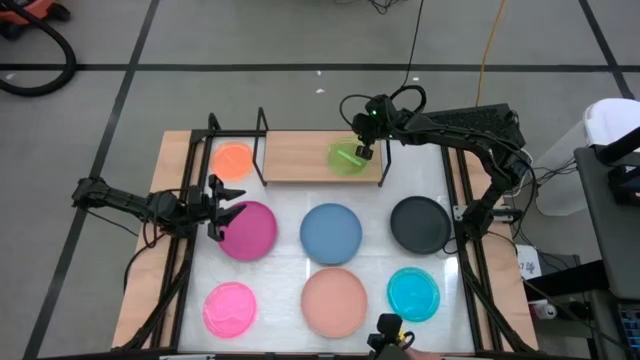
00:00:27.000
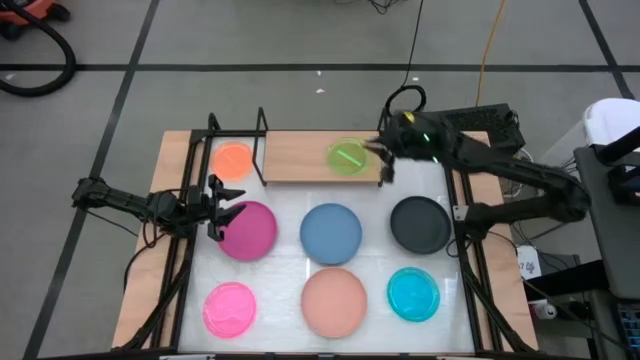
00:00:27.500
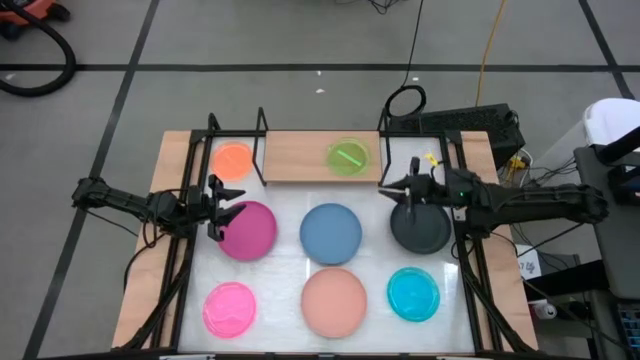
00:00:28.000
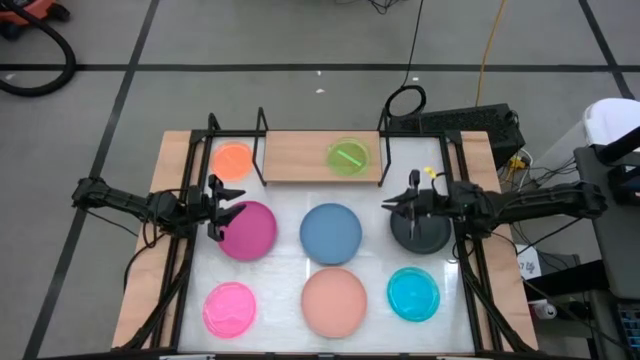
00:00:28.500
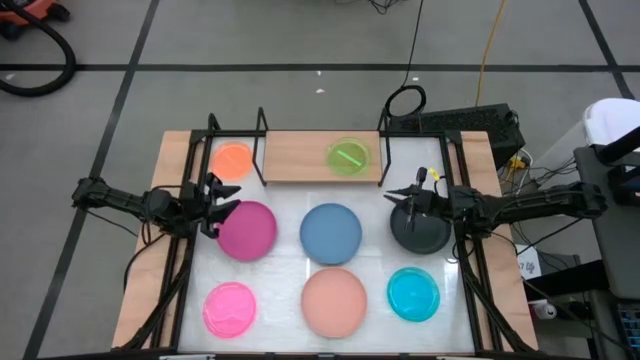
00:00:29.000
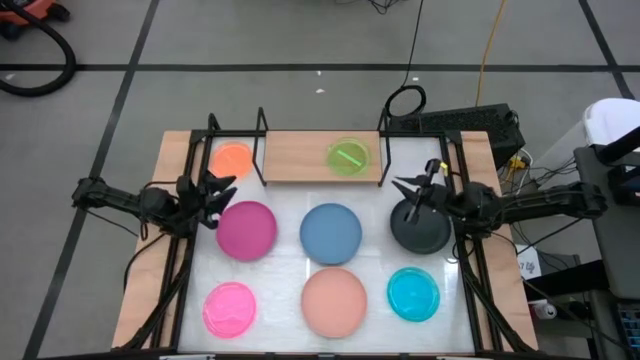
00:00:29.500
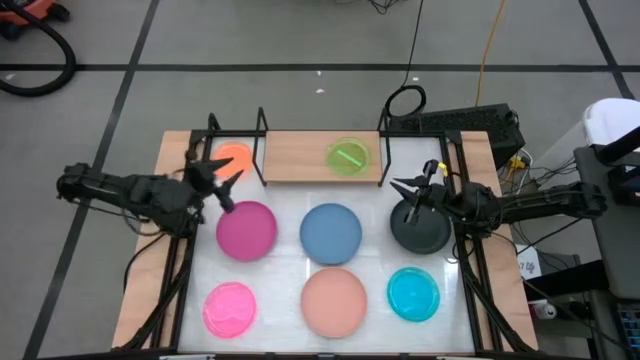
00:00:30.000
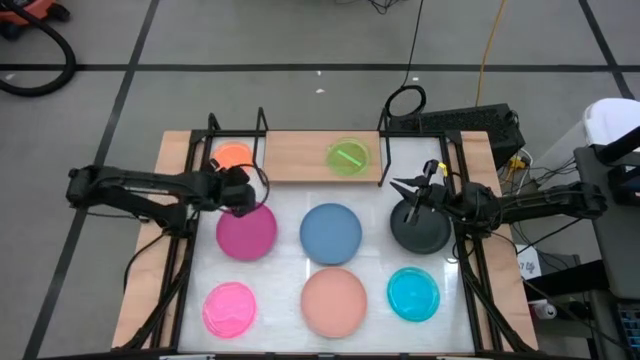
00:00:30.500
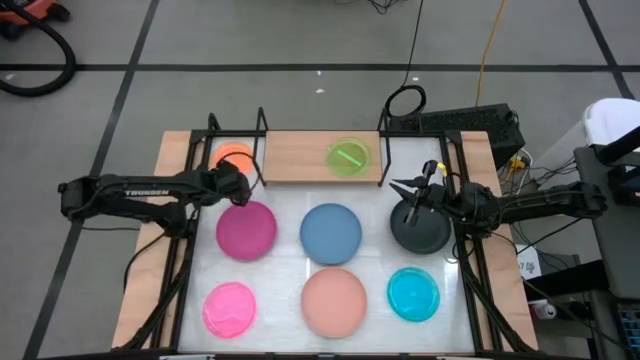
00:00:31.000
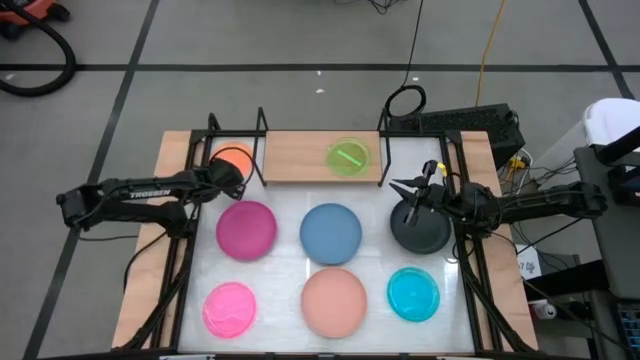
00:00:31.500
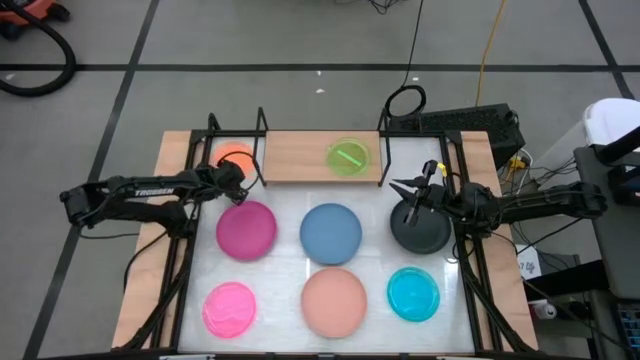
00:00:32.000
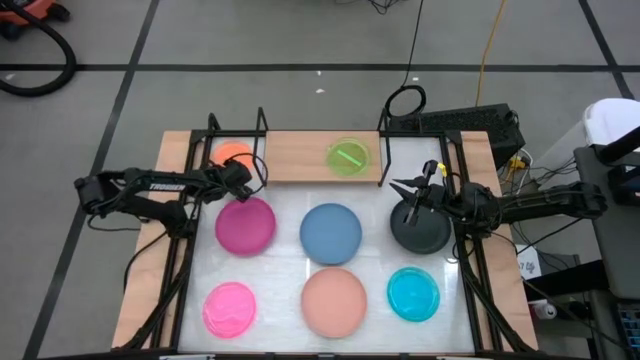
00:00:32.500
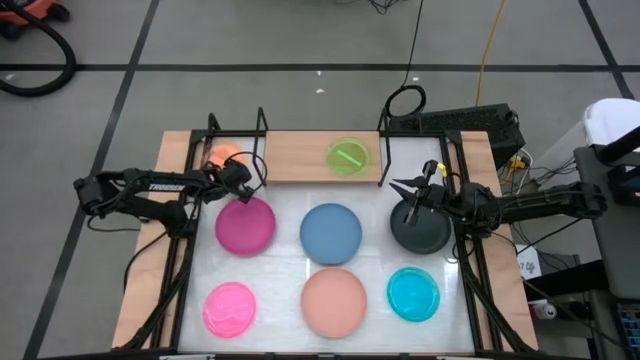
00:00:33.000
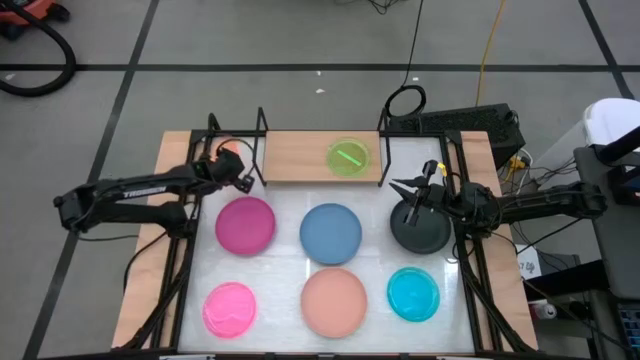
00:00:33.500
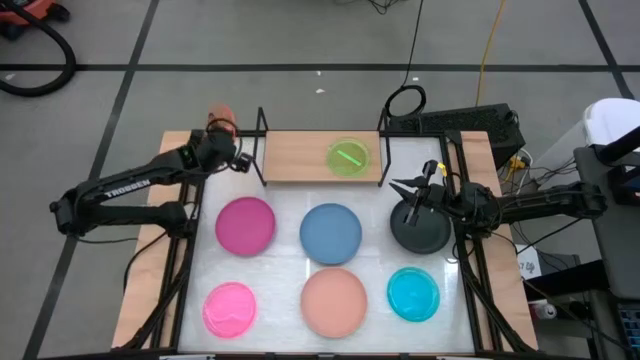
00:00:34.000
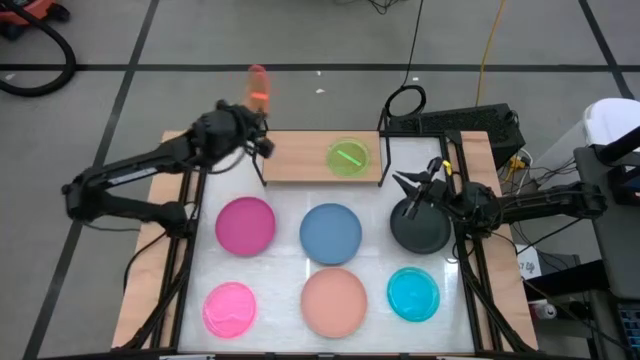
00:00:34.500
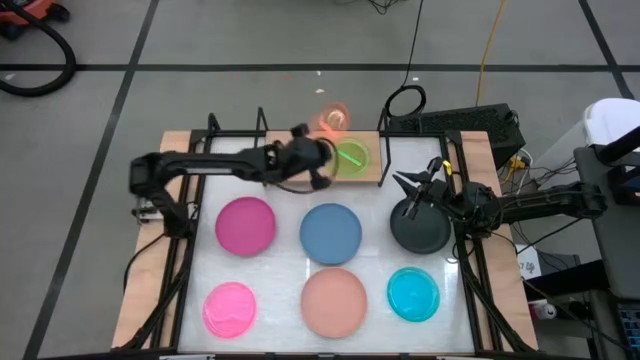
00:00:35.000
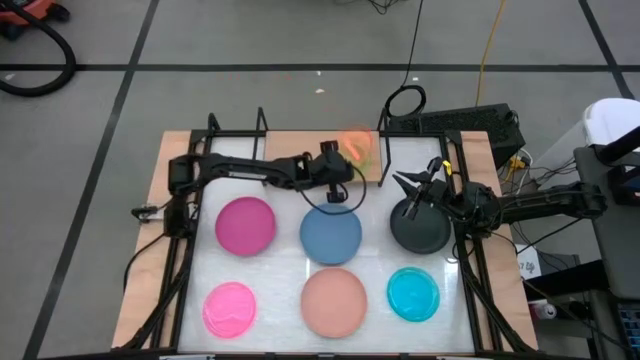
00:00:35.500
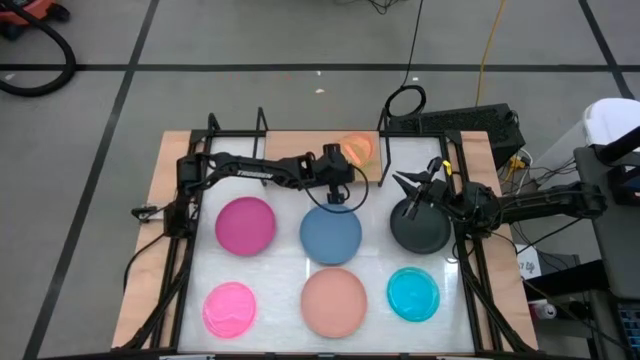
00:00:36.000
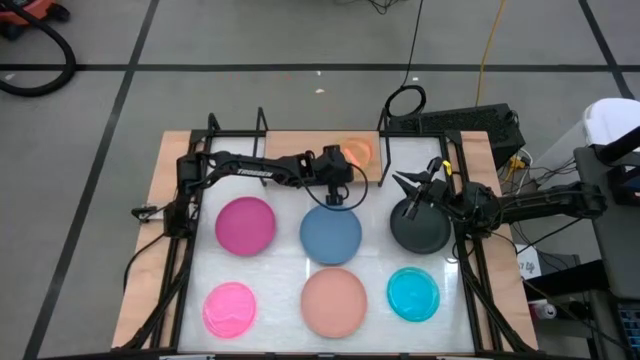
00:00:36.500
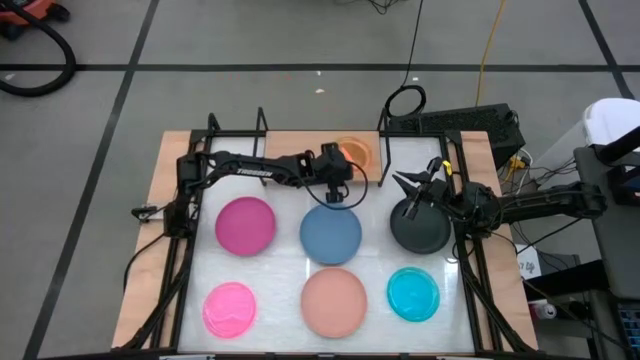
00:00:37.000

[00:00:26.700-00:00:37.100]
Task: Place and stack plates onto a shelf
Stack the orange plate on the green plate

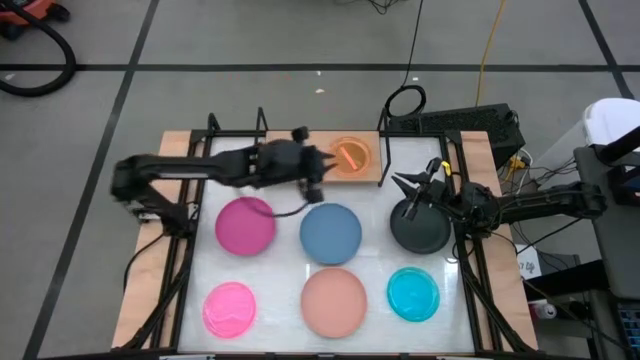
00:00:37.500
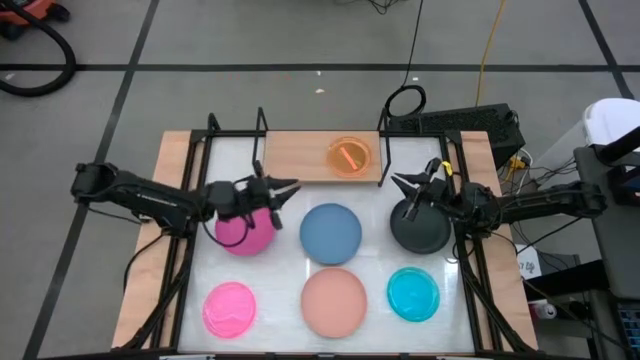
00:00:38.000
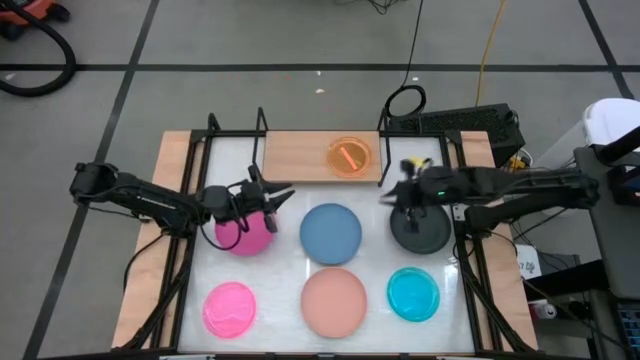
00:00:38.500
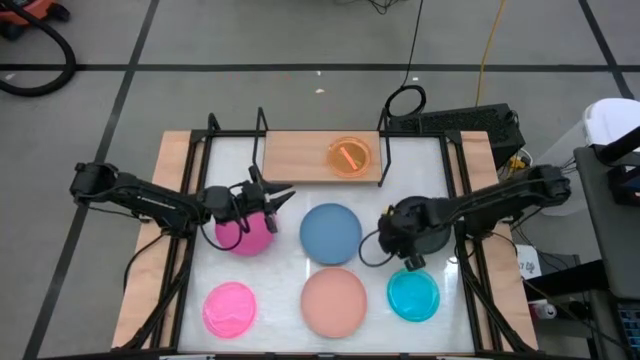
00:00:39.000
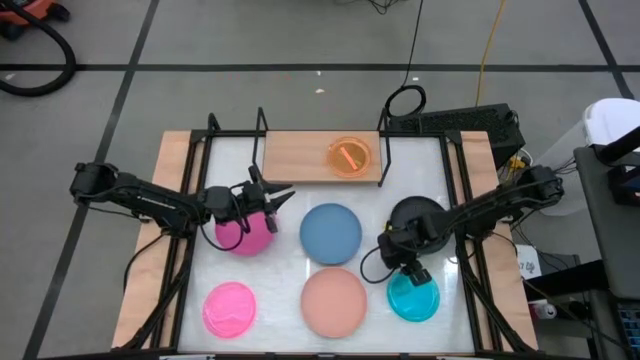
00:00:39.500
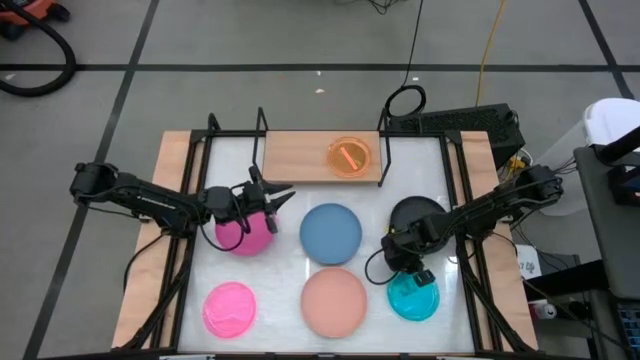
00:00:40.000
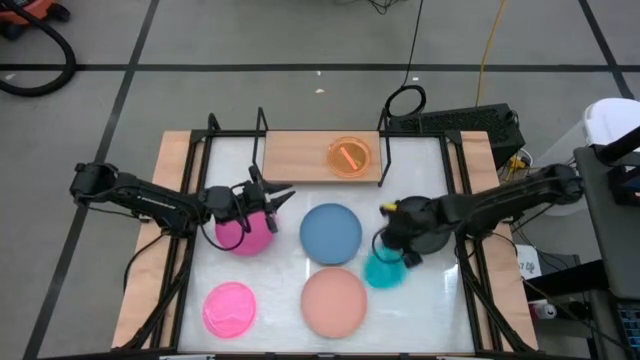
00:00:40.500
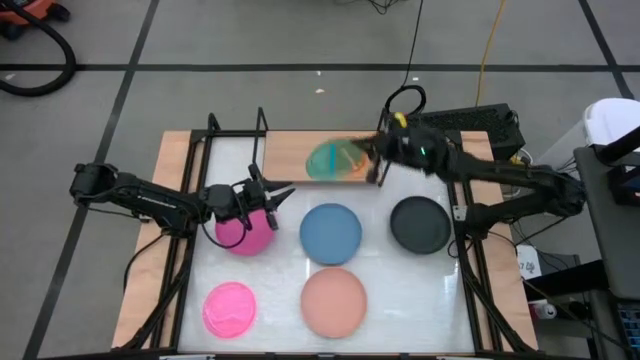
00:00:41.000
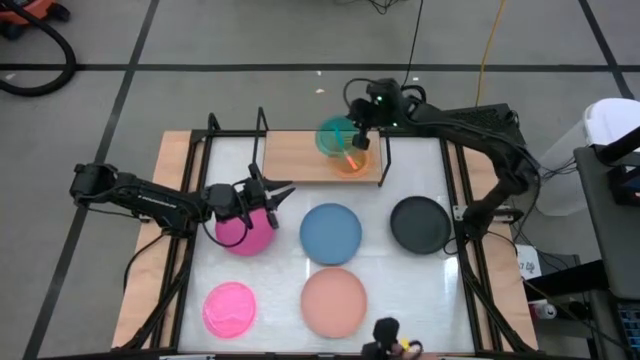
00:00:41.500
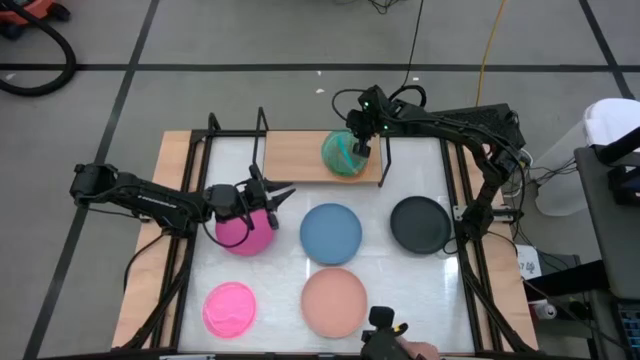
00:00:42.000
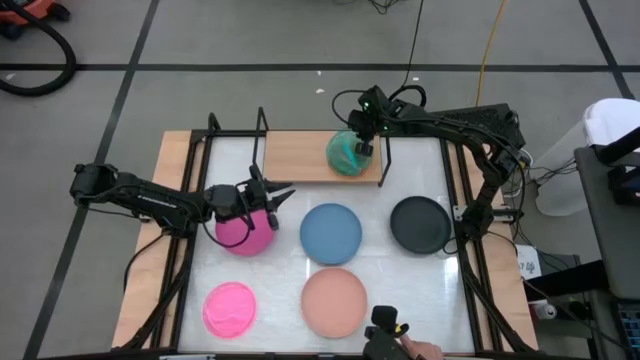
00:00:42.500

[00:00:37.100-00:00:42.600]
Stack the light blue plate on the orange plate

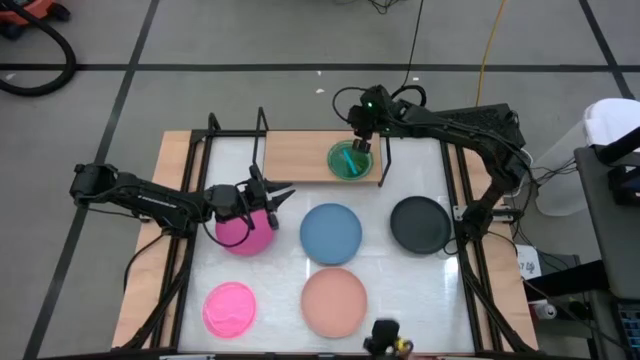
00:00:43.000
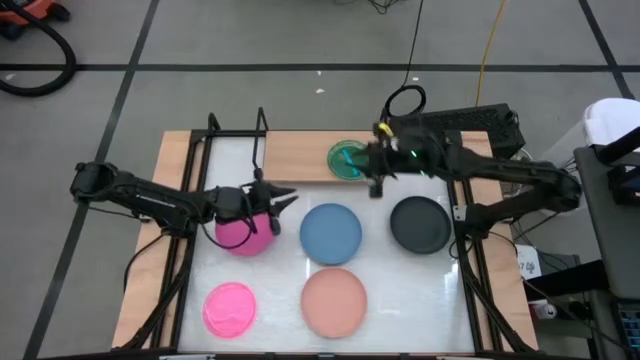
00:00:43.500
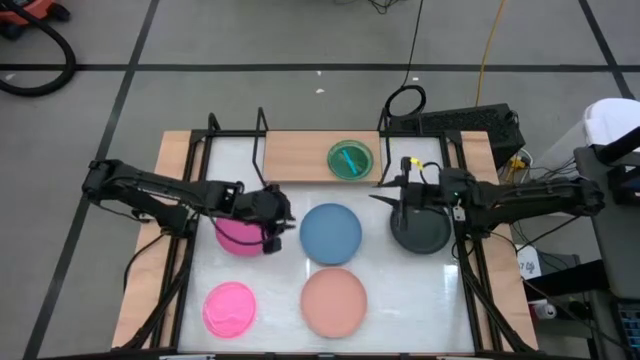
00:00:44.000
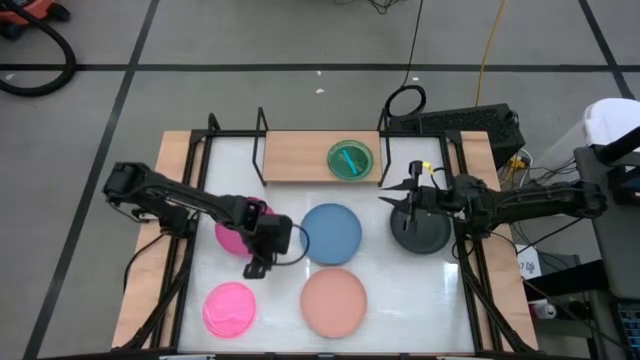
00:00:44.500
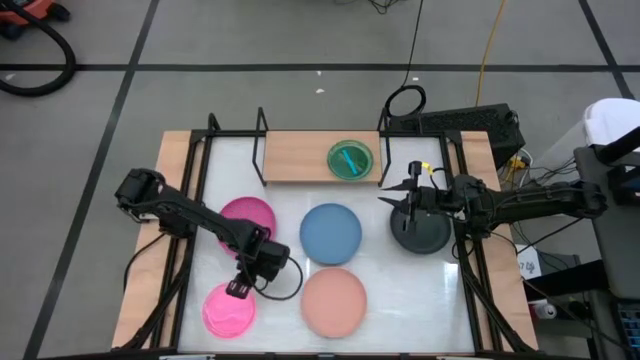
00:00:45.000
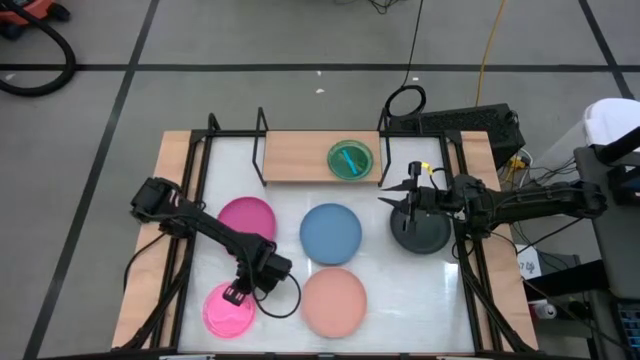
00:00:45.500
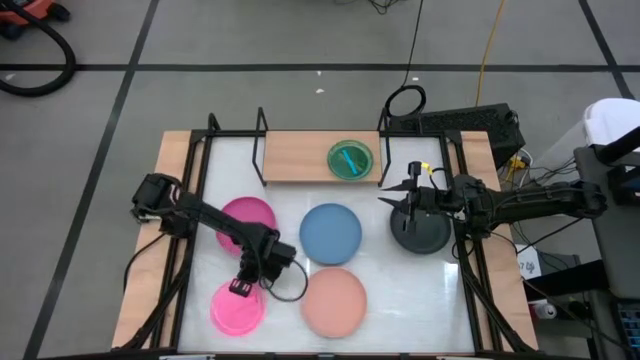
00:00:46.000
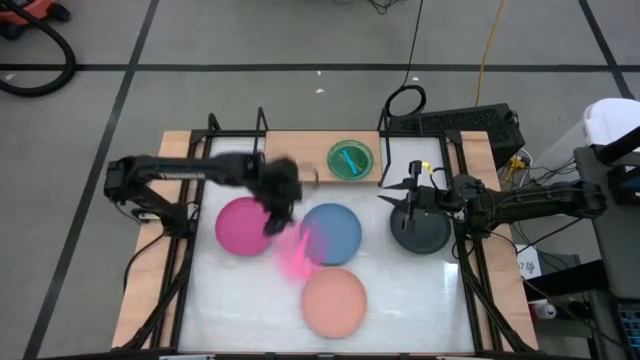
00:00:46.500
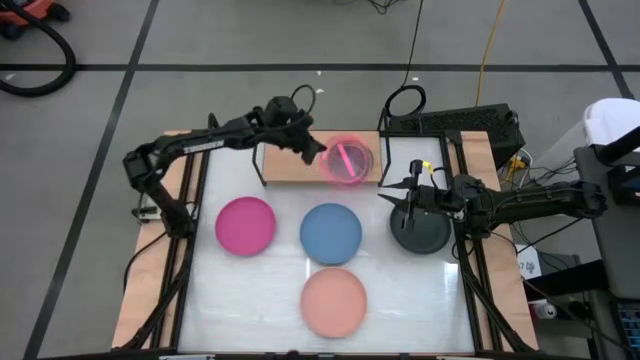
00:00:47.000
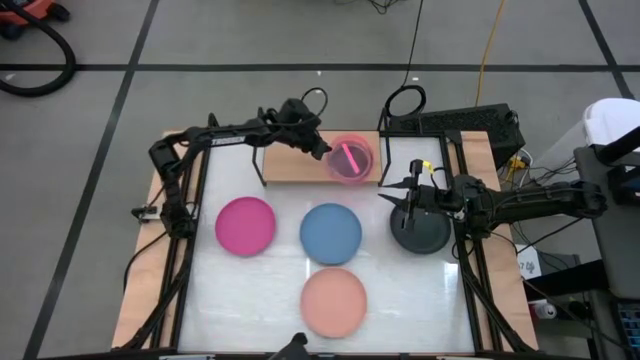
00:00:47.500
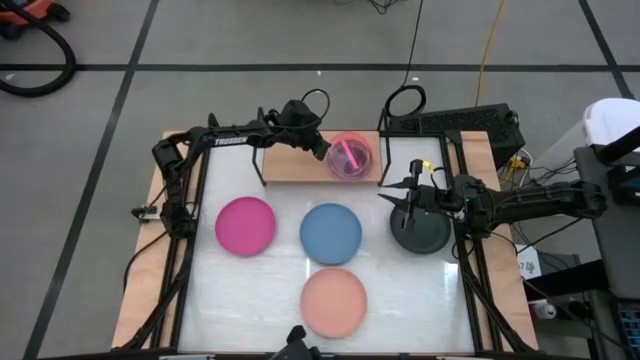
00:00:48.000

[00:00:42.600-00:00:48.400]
Stack the light pink plate on the light blue plate
